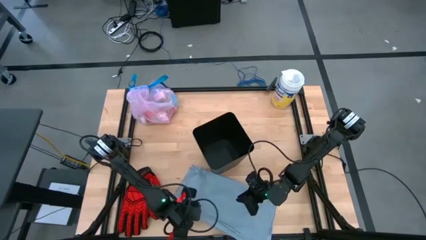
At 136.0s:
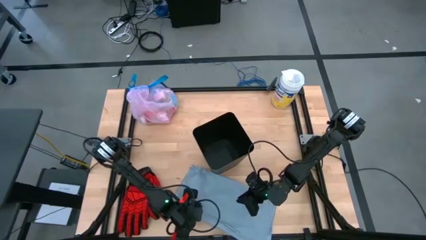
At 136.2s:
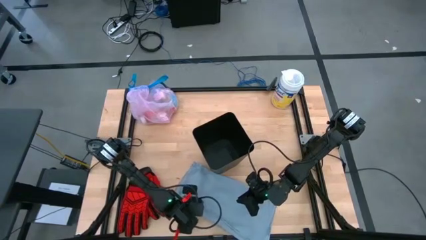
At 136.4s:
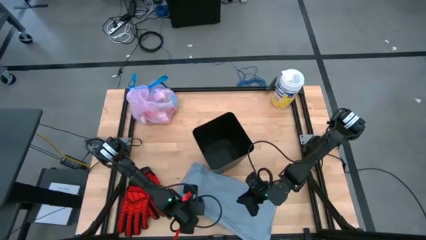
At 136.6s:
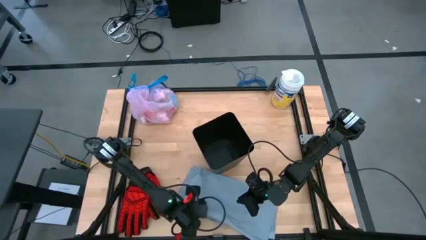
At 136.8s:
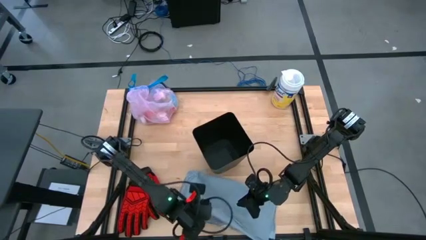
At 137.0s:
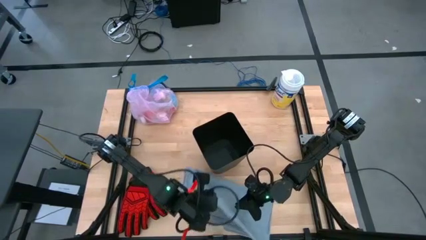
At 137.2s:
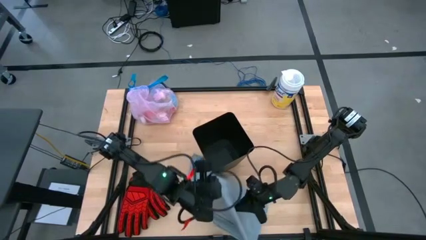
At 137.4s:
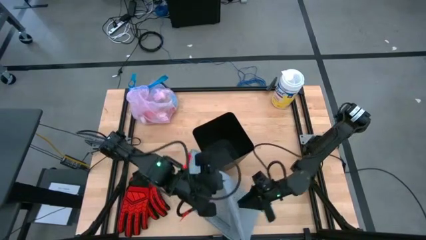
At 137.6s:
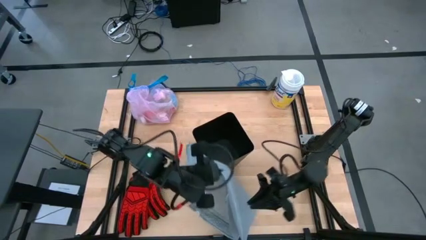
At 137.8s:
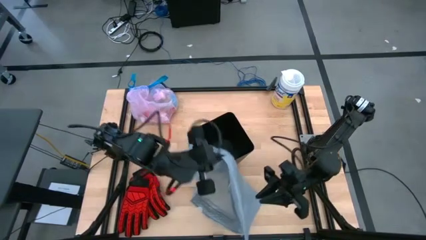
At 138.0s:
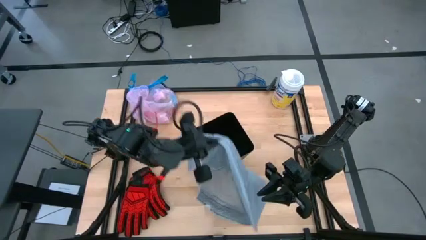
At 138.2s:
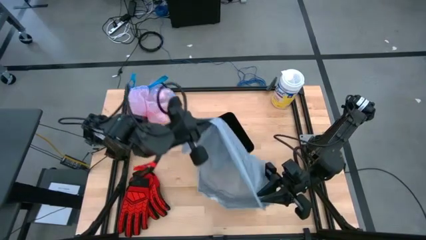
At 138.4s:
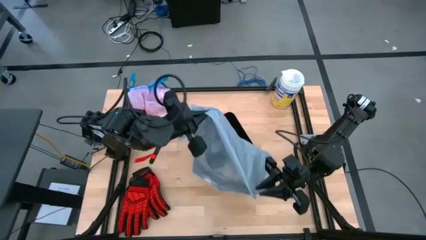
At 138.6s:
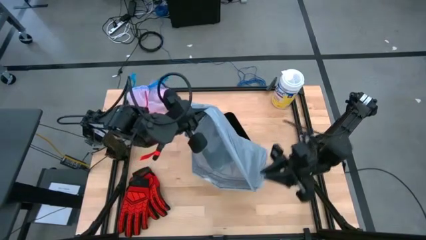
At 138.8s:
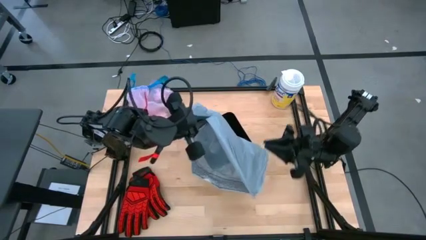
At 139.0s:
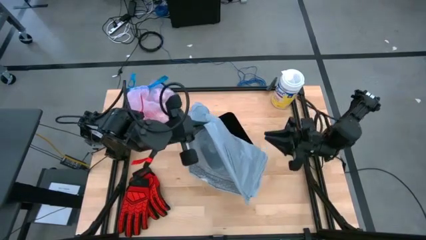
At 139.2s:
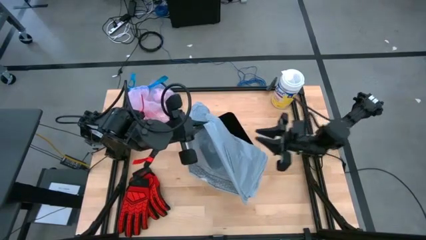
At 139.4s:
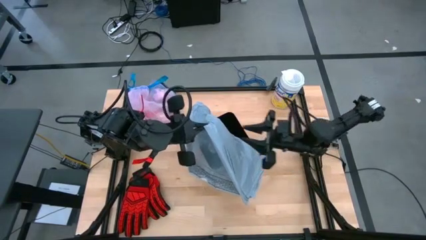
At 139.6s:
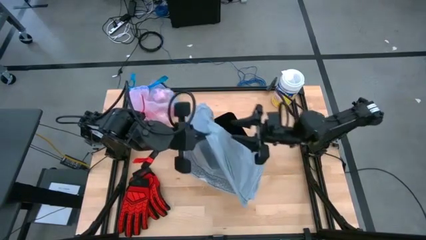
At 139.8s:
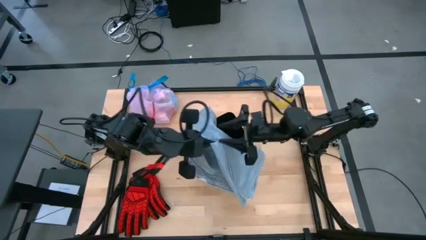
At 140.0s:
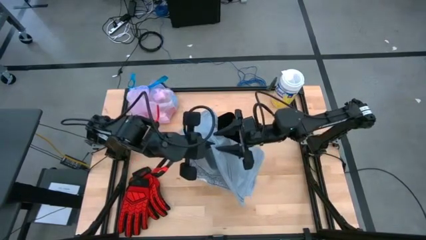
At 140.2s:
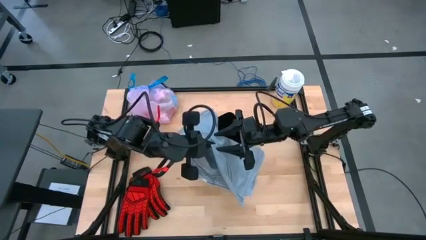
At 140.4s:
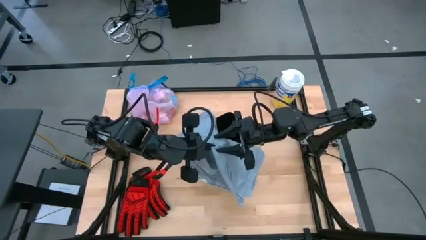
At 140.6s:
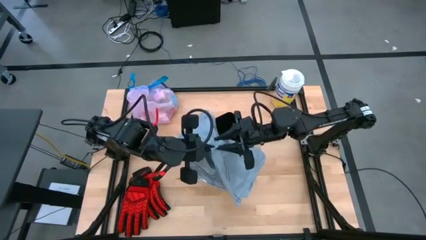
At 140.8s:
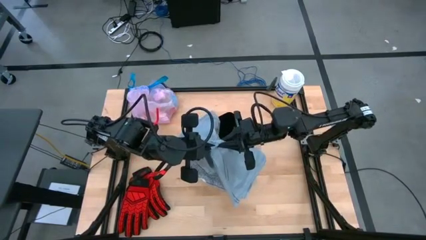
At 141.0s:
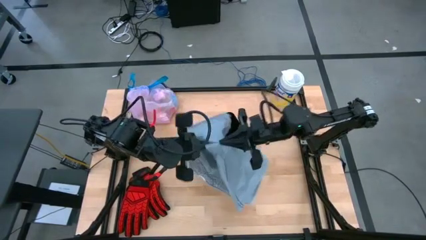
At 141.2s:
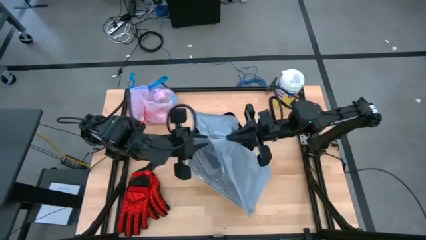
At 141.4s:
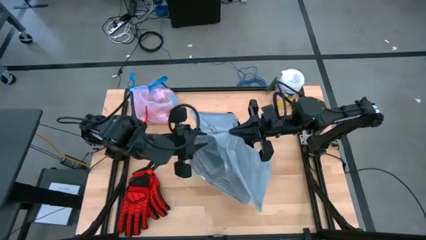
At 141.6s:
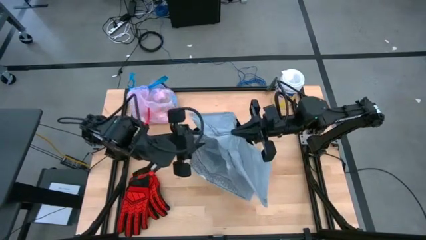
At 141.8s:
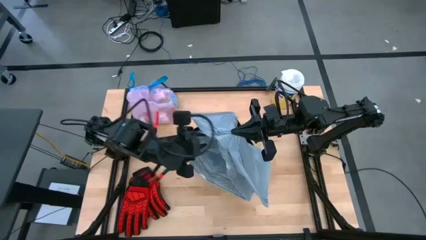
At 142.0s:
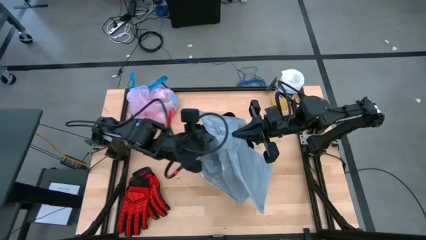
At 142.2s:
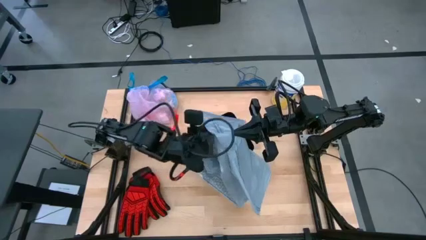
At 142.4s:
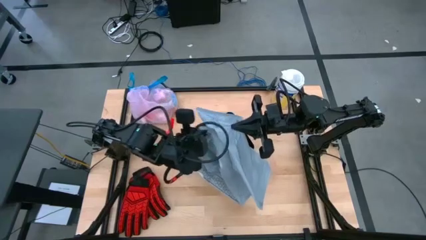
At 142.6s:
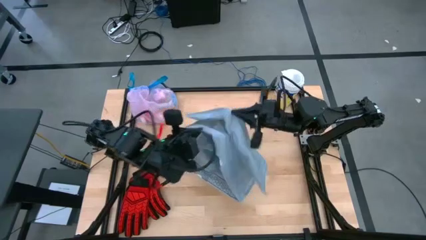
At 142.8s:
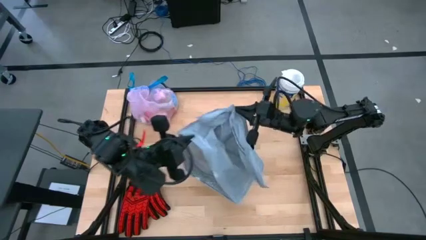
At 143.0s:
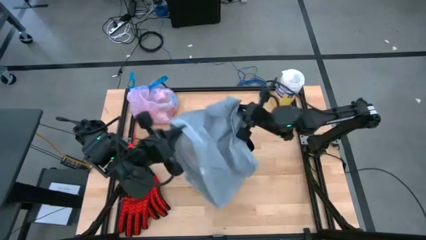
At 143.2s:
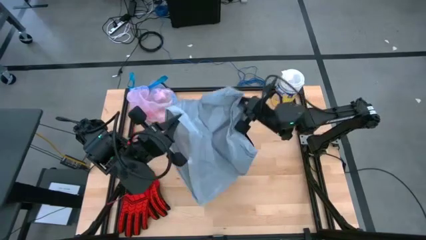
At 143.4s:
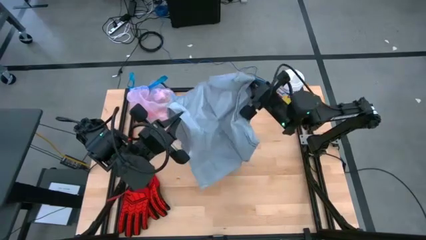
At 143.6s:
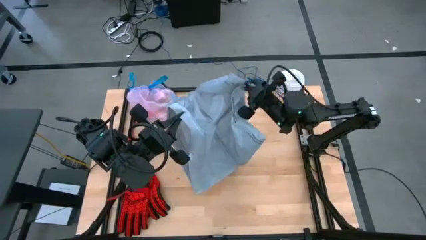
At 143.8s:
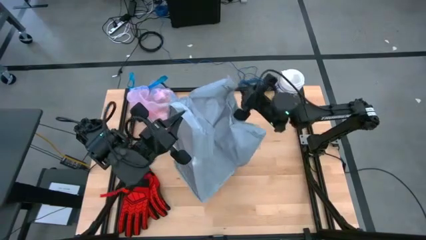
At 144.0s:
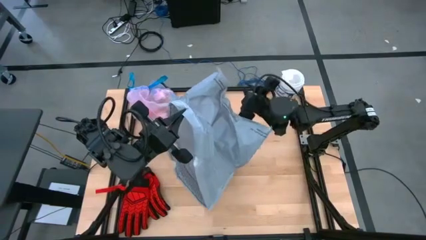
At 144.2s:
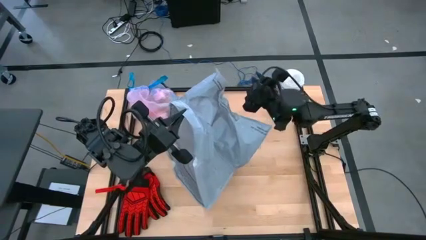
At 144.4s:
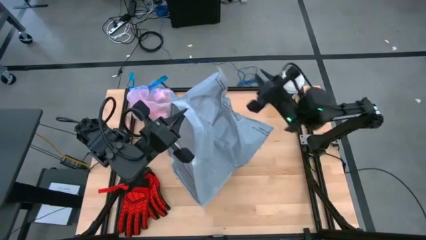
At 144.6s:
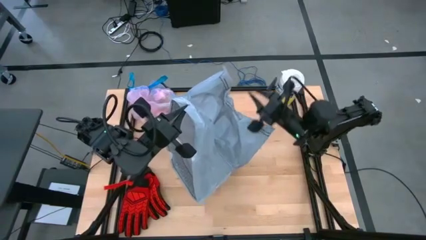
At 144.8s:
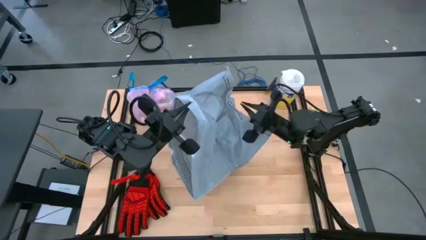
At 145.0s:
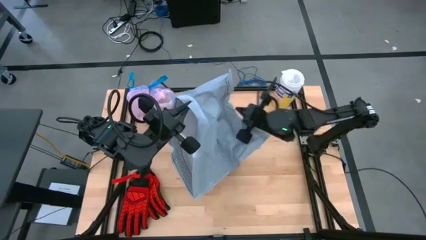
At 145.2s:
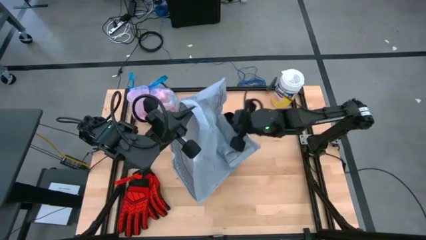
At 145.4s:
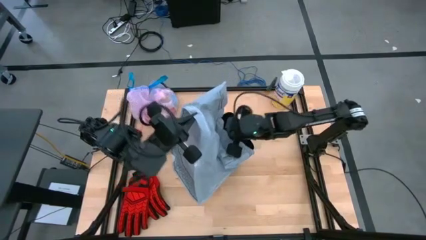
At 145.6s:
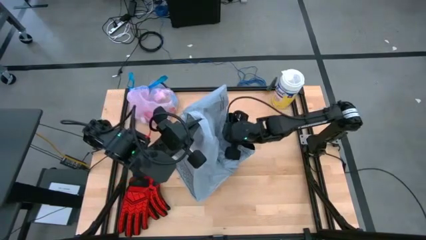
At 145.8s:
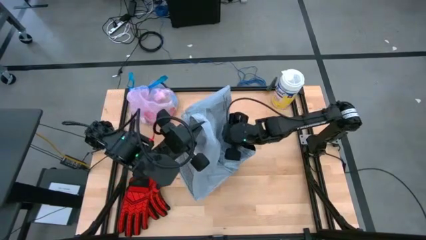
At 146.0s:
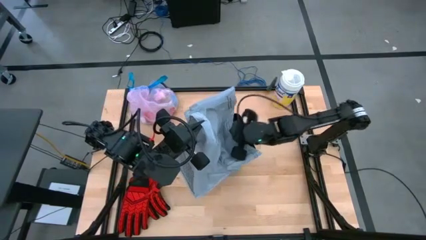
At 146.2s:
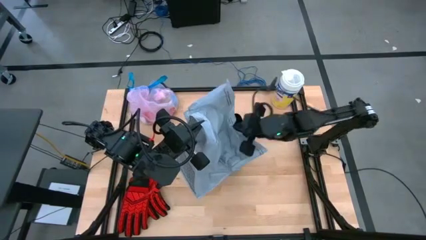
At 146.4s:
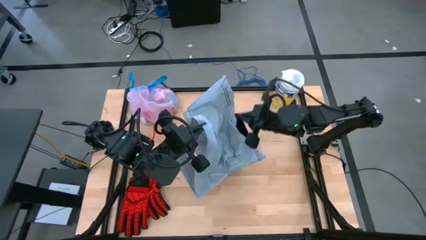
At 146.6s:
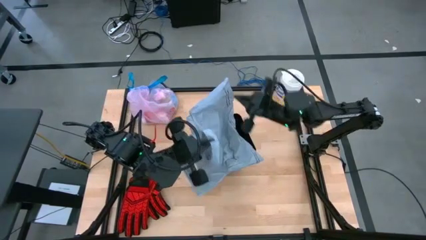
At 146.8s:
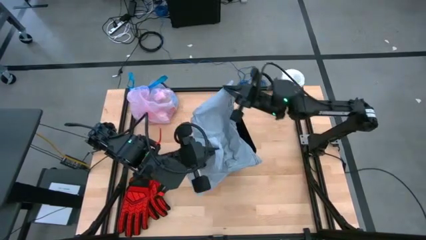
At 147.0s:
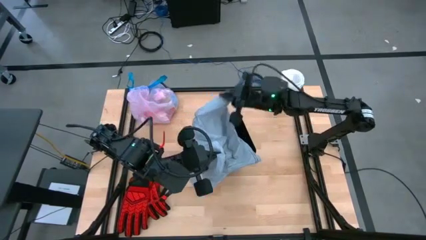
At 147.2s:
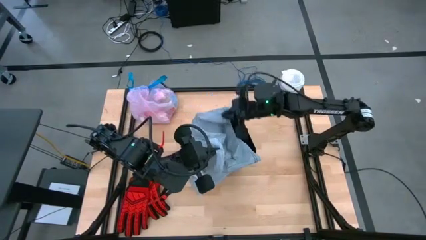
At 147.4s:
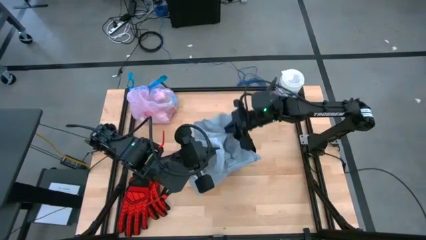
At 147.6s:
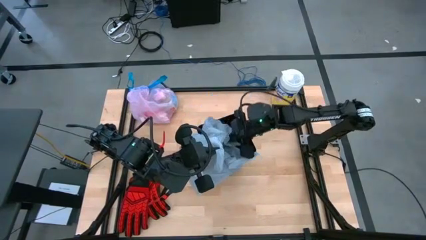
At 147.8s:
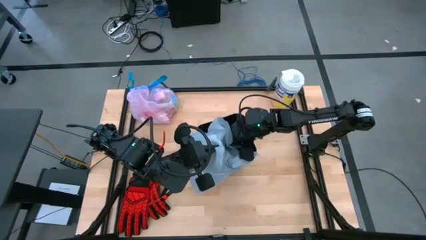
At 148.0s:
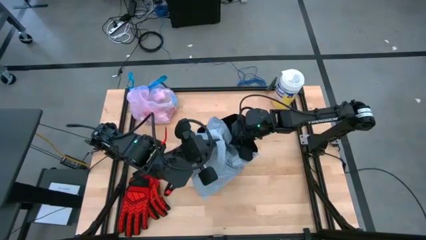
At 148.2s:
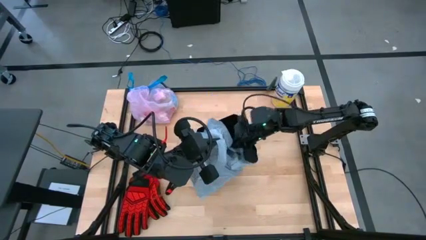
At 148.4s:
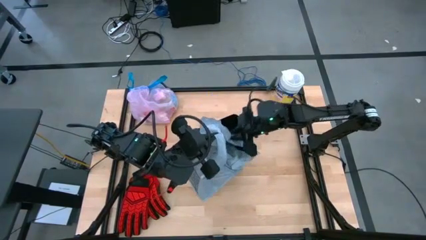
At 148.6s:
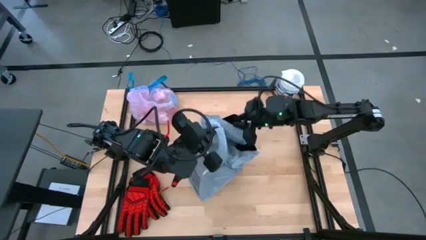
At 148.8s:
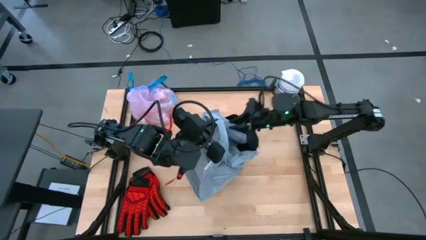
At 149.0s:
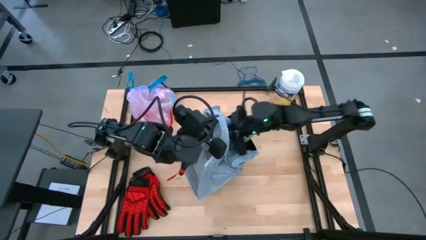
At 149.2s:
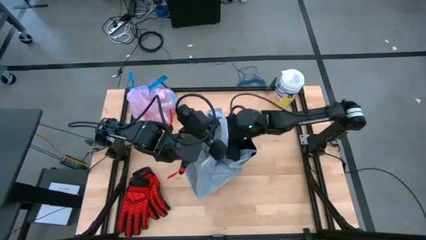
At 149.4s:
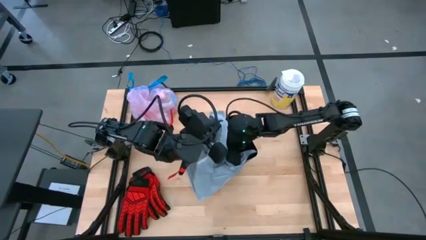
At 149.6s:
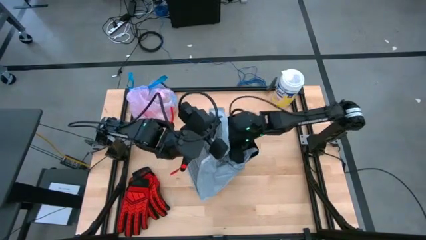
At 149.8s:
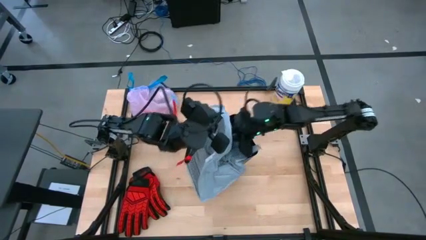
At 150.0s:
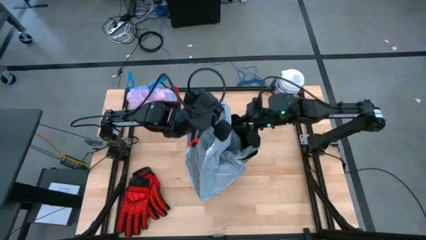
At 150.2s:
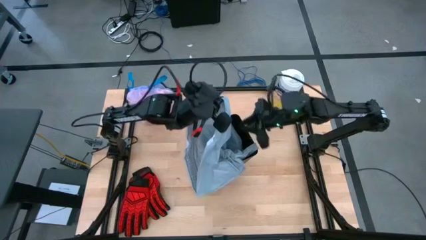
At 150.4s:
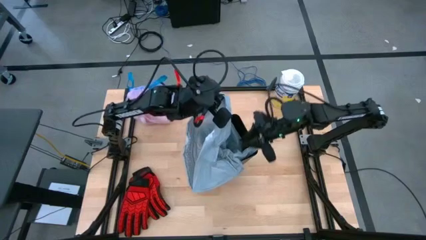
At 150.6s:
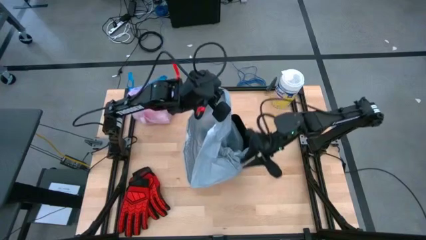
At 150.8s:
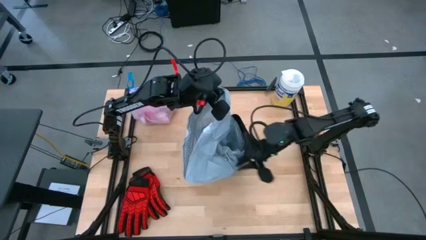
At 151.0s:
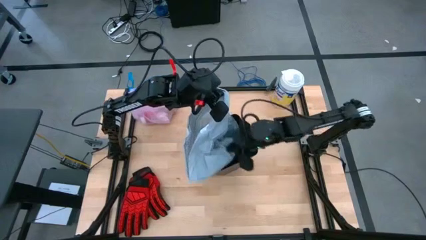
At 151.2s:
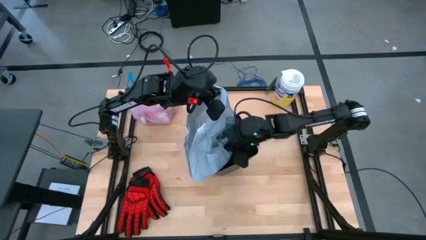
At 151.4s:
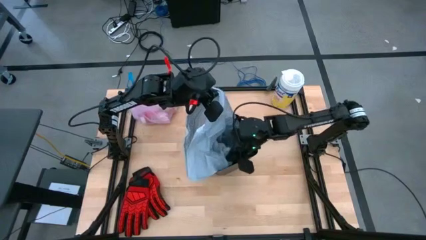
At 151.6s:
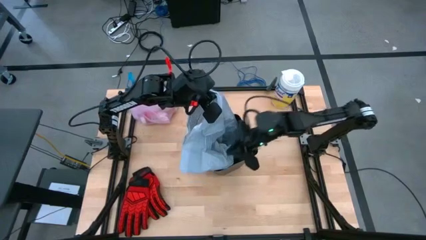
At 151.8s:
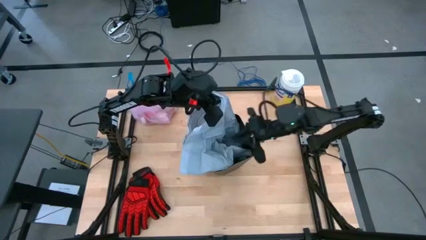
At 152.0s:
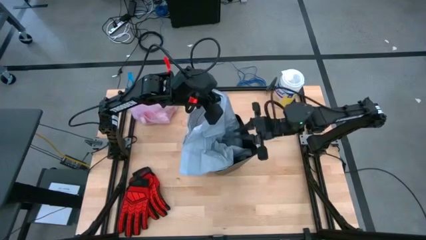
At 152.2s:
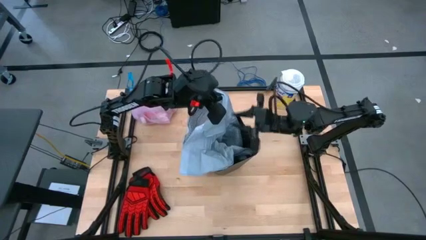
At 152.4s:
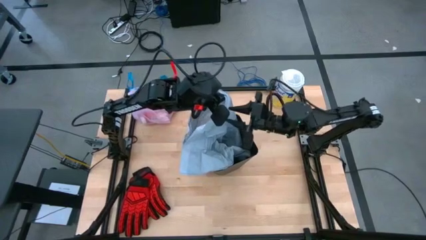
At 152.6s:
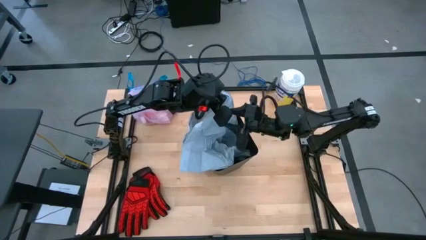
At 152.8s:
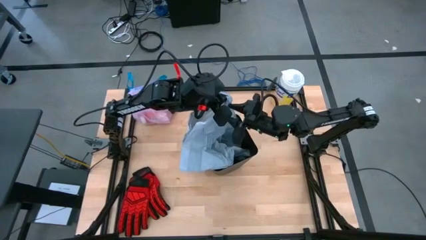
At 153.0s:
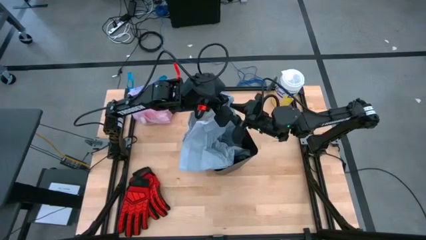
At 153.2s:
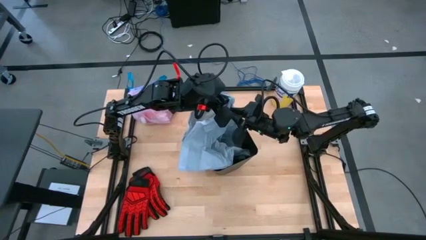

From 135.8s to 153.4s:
Task: place trash/remove bag and relplace
Put the gray trash bag into the trash bin
